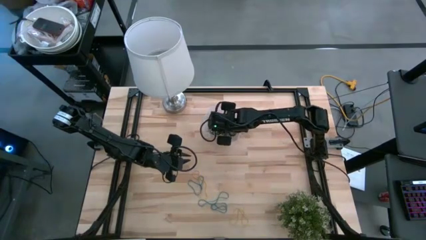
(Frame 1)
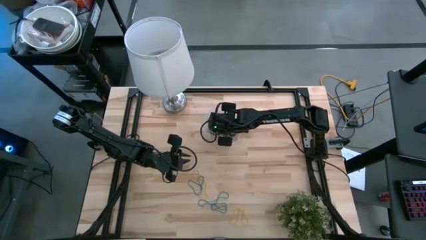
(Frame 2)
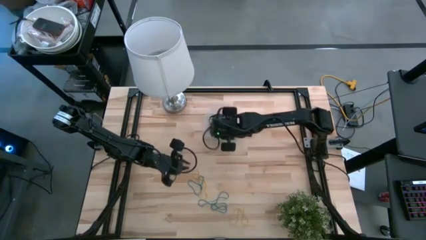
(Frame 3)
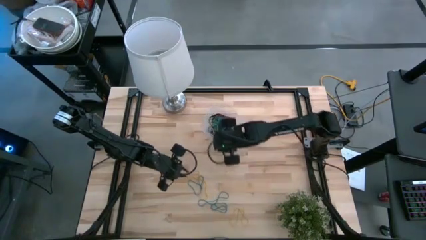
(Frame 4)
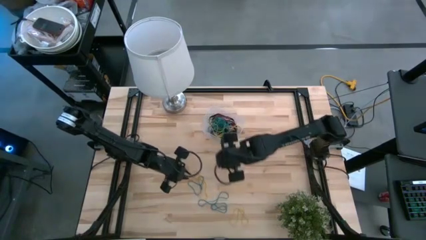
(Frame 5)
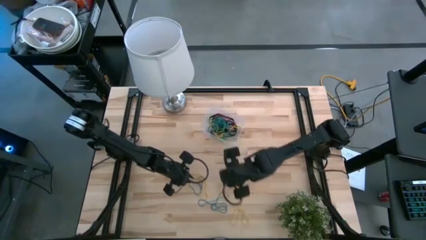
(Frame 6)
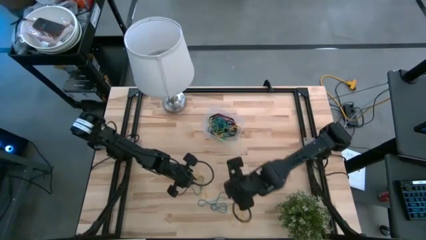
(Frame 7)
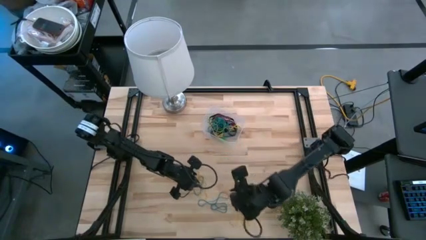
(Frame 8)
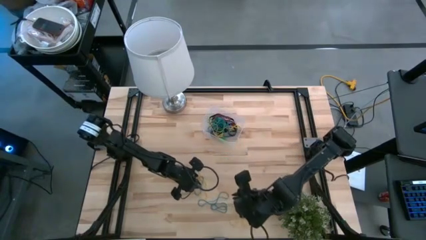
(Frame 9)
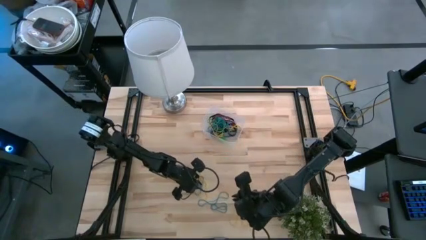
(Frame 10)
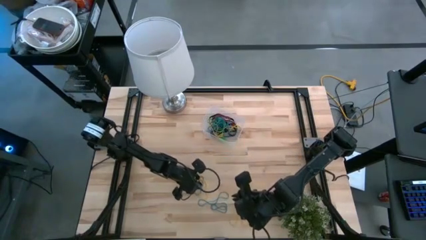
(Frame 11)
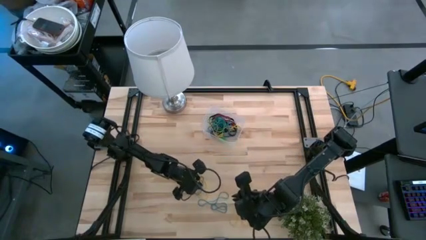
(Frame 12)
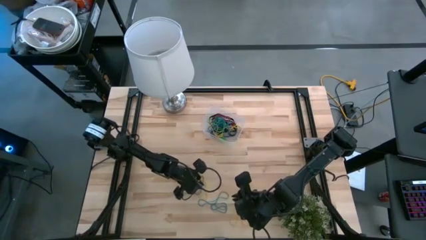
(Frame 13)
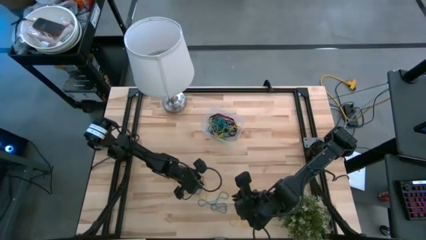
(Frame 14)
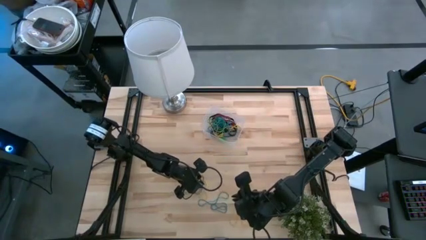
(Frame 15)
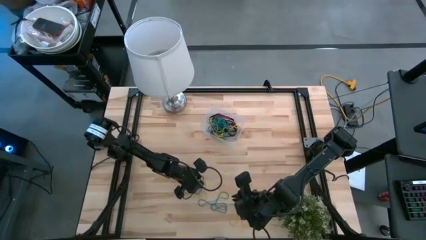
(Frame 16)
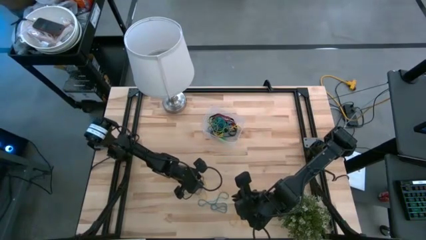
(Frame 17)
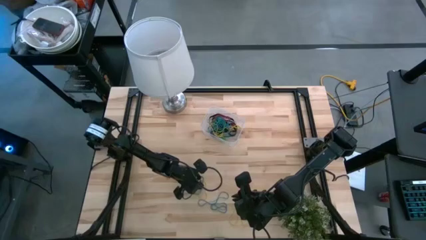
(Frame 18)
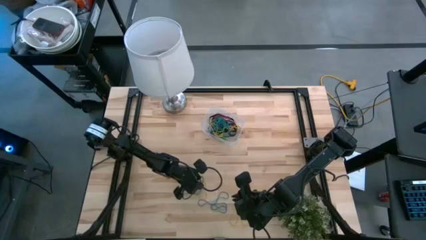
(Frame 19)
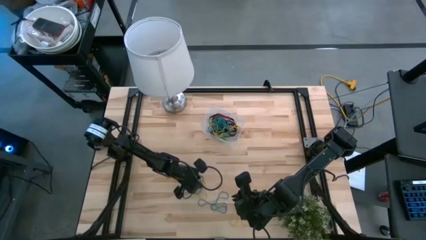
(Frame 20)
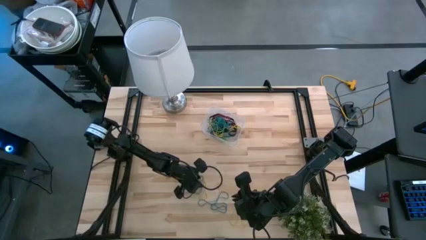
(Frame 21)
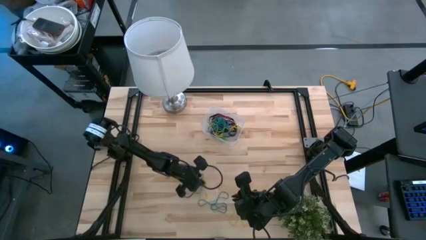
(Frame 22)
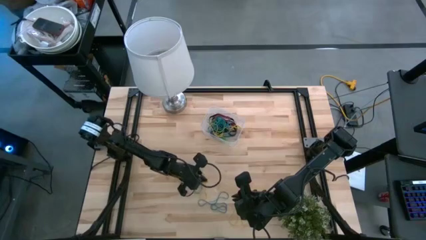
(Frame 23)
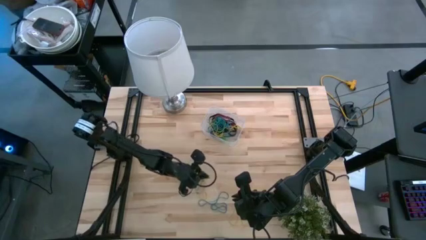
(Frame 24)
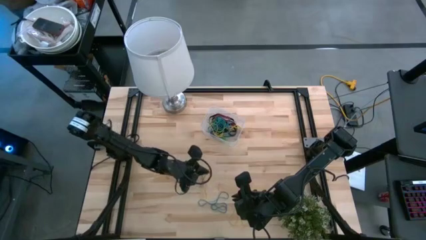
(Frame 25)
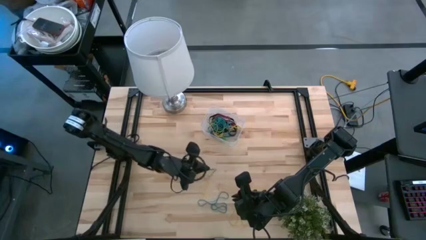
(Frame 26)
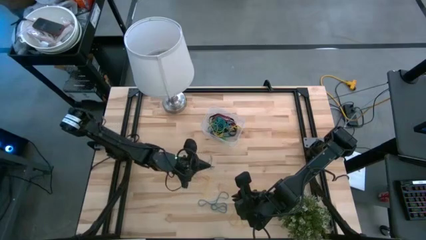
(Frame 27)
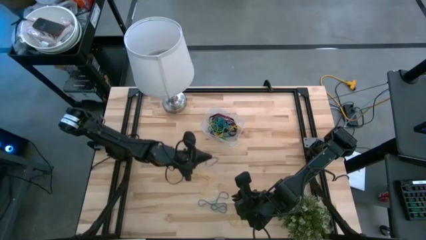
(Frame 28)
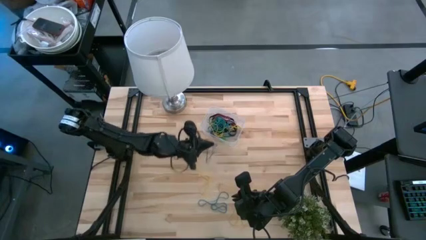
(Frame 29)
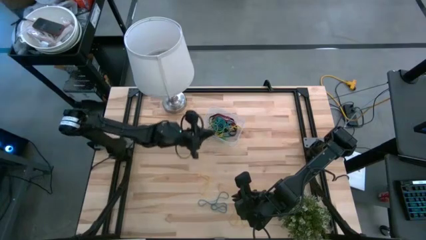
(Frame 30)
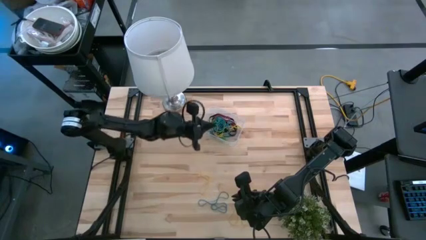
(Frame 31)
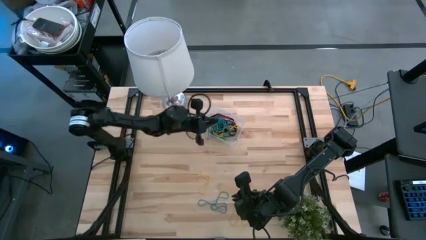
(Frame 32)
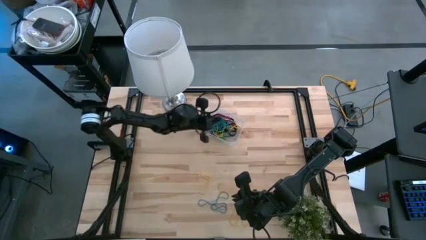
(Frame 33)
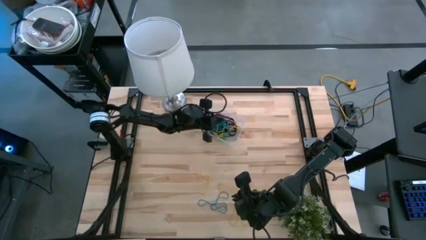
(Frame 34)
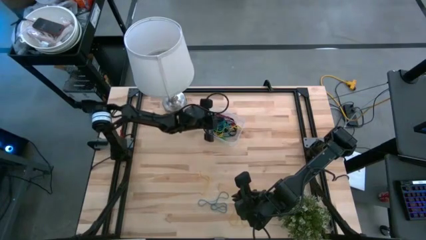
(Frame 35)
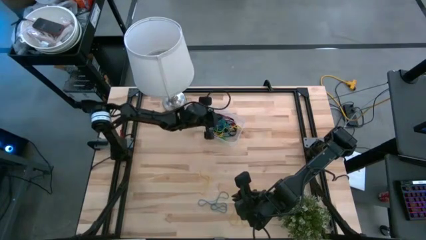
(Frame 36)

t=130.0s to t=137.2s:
Task: Pick and place rubber bands into bin
Put the blue rubber bands into the bin

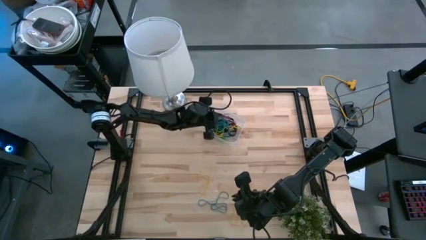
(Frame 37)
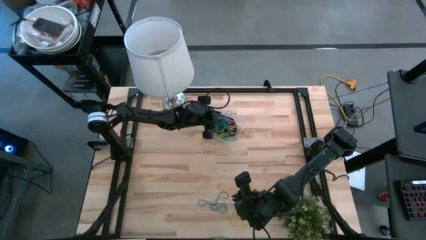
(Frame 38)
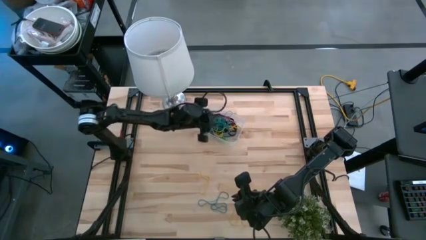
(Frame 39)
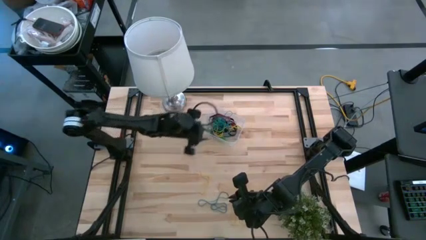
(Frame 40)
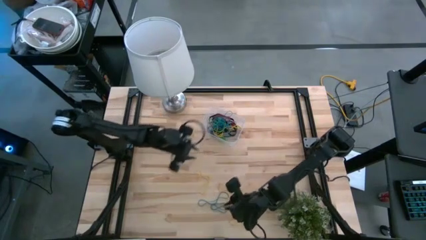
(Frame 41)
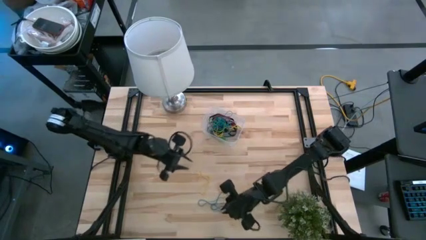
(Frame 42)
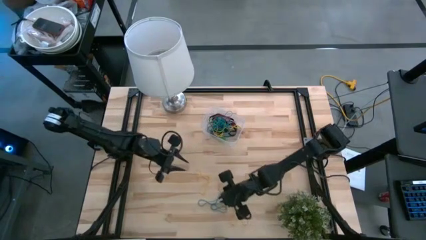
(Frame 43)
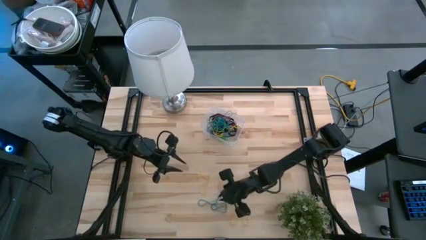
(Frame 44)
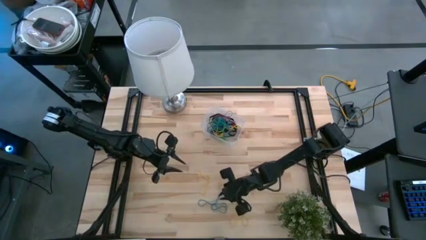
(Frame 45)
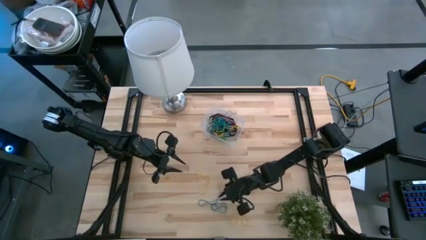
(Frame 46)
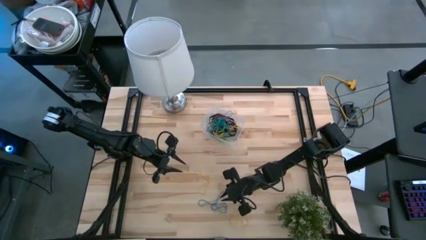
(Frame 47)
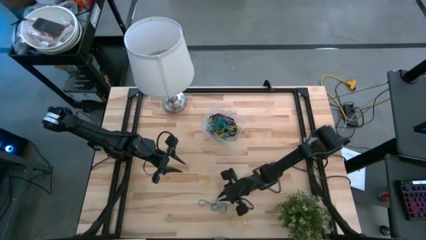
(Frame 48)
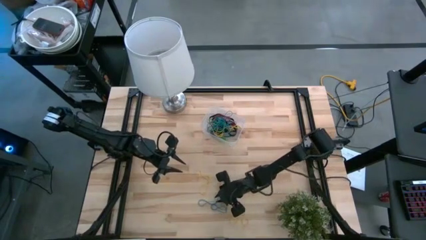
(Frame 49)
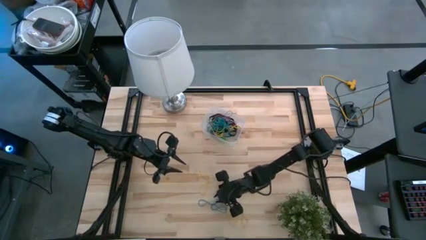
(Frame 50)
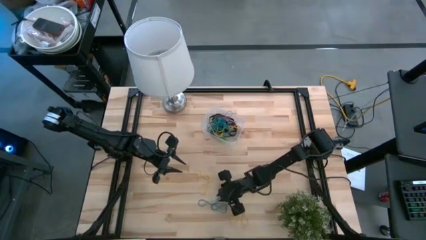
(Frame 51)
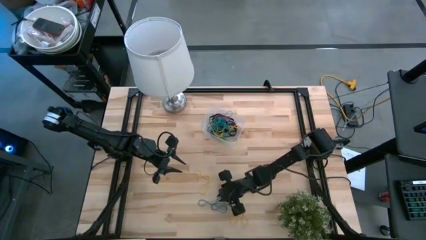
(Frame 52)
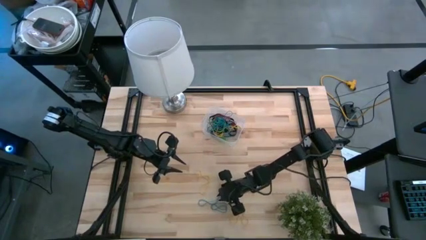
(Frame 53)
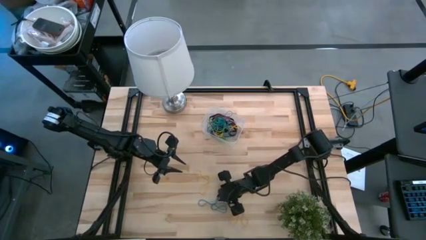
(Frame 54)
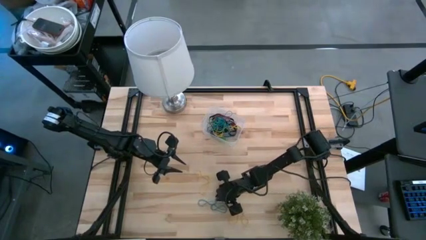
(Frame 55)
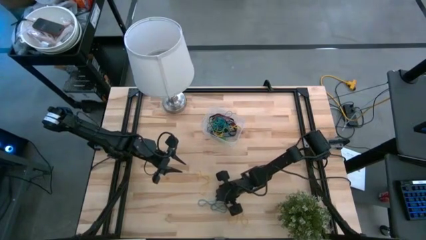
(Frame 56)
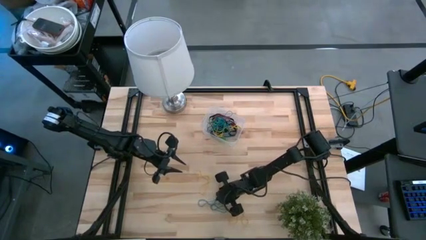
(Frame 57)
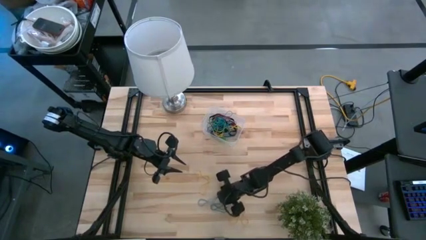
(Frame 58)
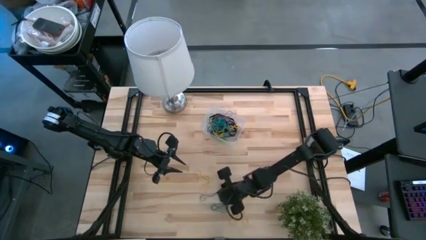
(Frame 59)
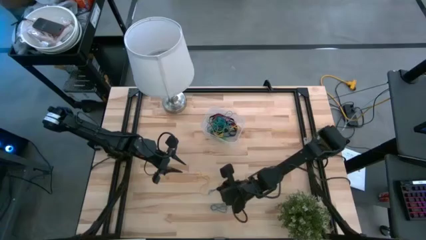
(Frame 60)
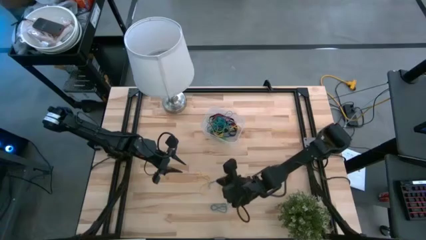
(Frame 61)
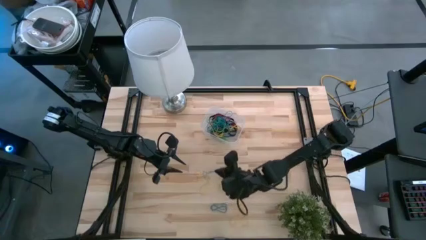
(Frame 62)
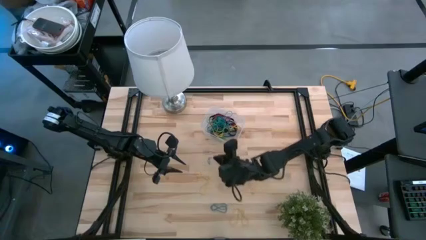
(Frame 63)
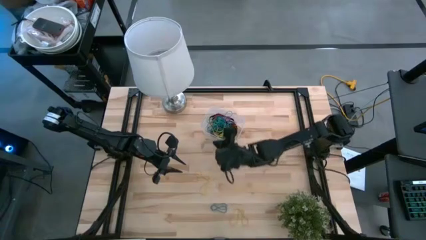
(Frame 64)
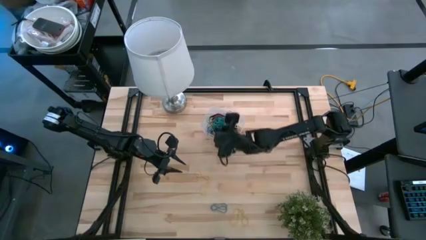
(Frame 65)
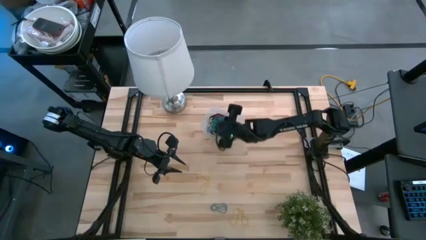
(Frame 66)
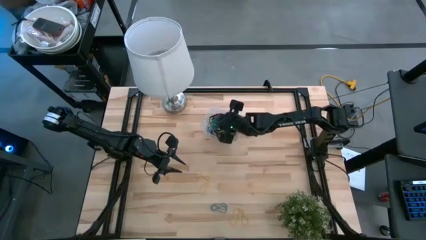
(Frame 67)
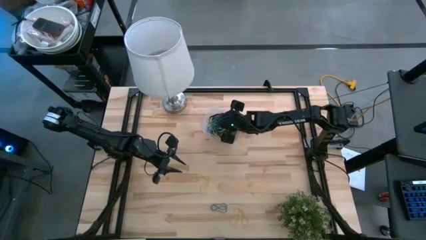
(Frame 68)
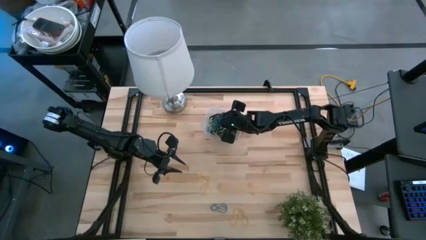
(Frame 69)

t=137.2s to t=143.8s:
Put the blue rubber bands into the bin

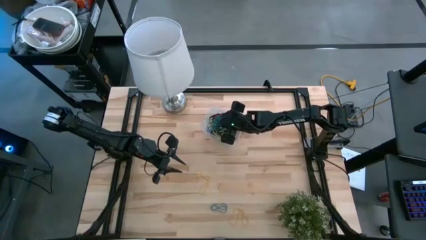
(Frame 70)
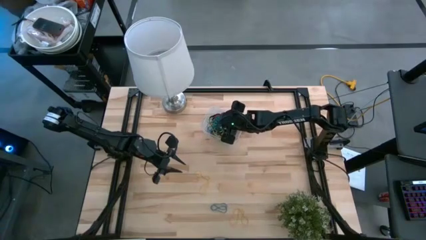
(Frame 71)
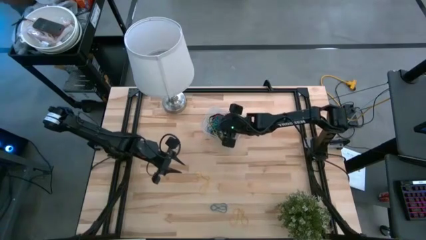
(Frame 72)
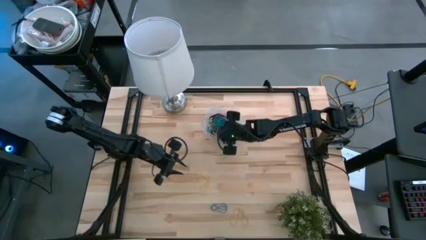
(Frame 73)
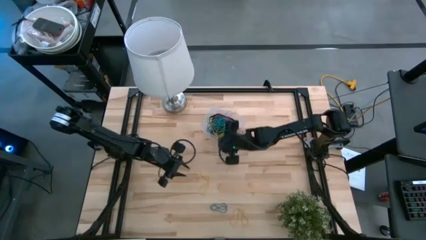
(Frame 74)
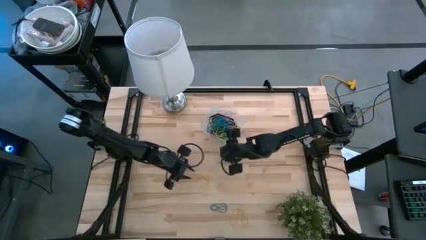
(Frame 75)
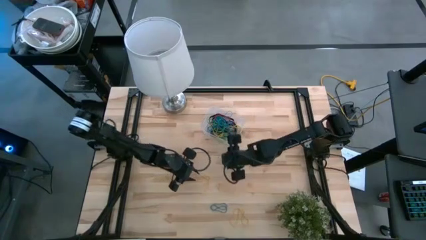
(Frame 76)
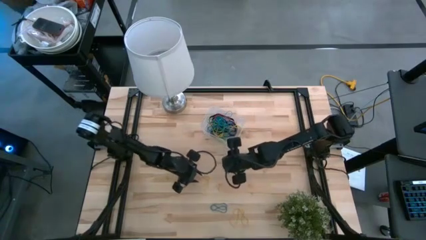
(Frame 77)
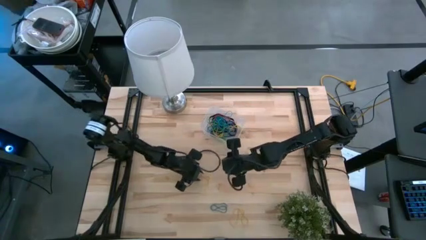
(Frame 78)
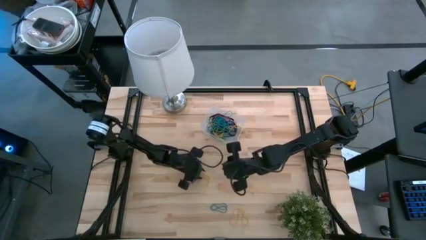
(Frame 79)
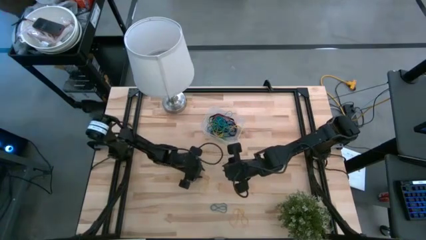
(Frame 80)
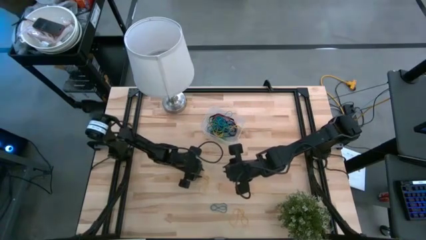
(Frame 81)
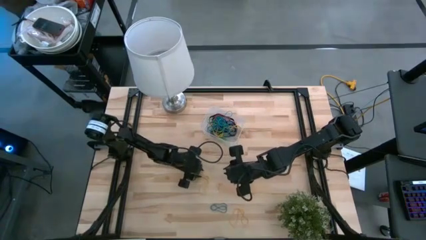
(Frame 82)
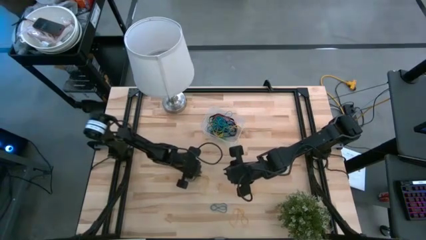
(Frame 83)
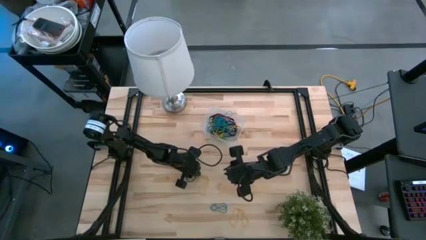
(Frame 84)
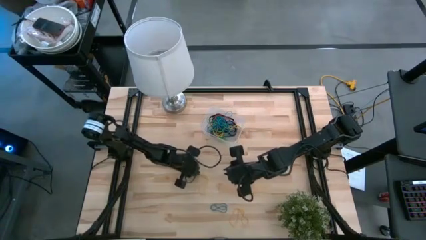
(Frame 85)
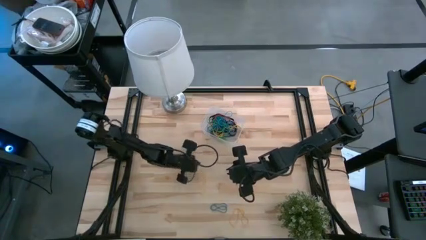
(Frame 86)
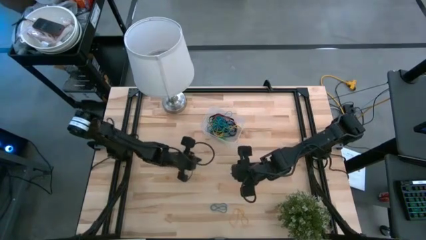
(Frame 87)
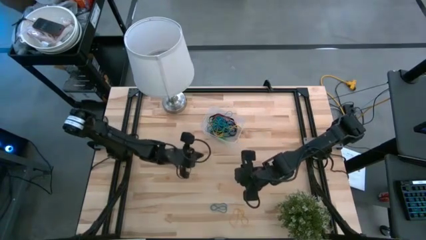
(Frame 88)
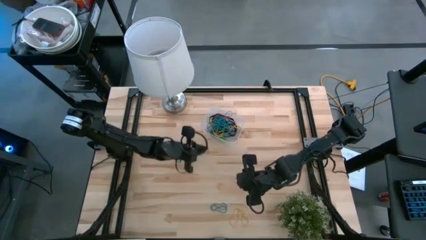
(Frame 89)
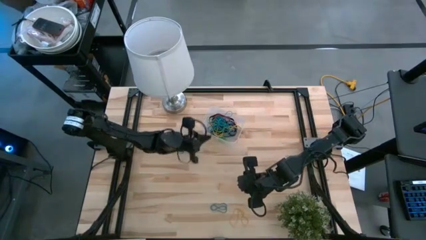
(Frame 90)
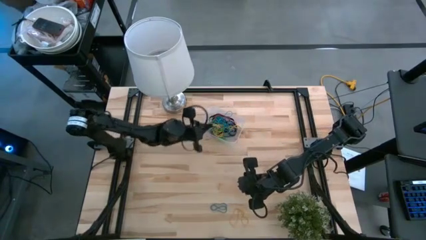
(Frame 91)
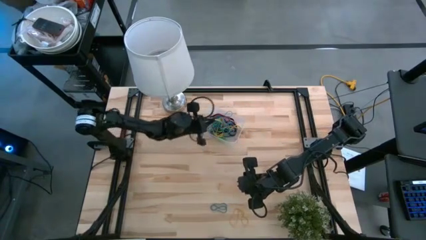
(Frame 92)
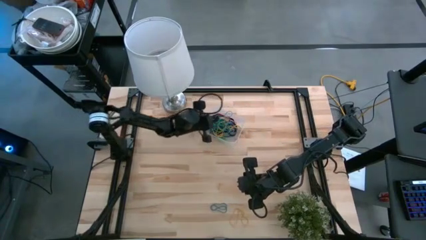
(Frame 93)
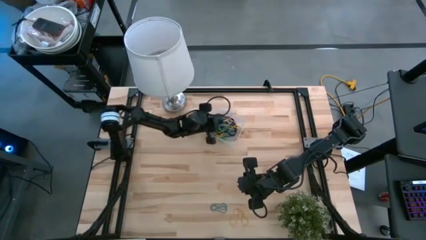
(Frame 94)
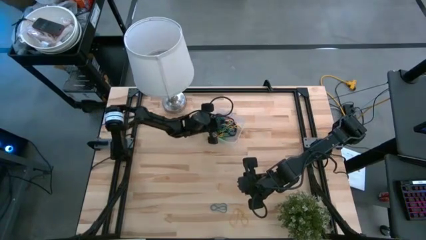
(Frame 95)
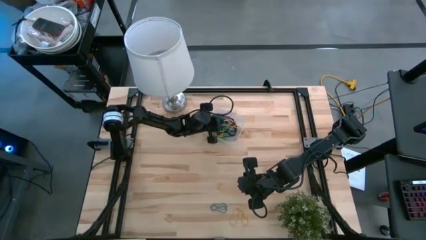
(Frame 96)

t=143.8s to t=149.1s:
Put the yellow rubber bands into the bin
